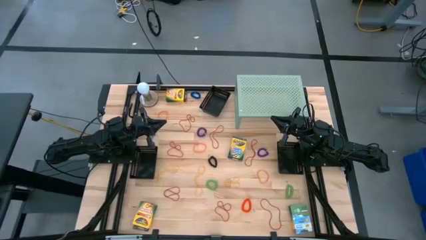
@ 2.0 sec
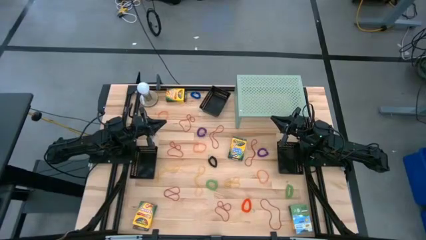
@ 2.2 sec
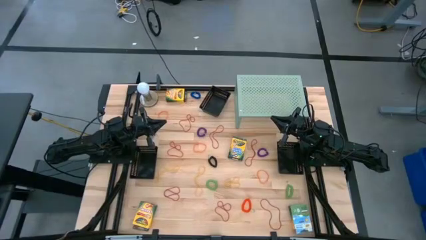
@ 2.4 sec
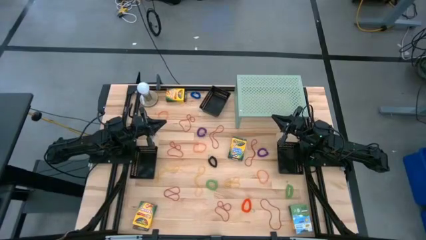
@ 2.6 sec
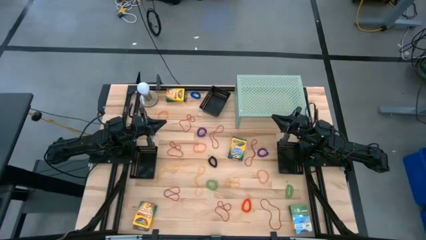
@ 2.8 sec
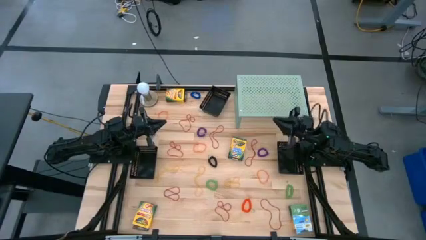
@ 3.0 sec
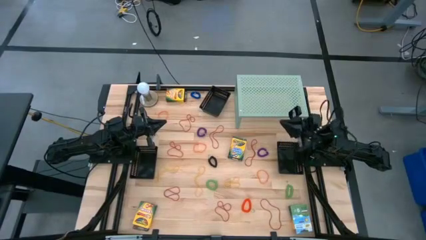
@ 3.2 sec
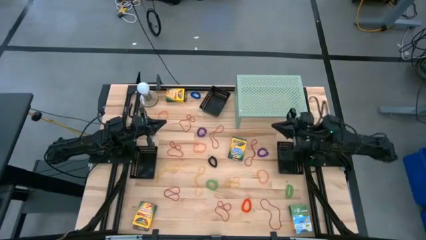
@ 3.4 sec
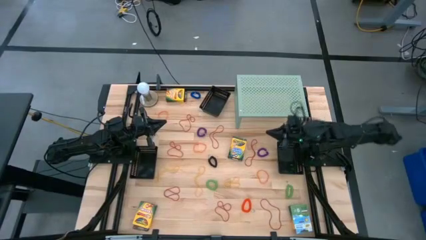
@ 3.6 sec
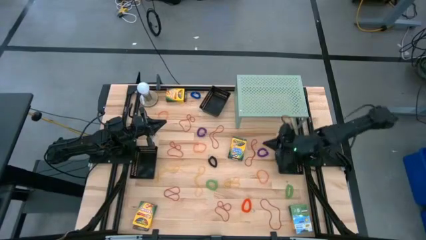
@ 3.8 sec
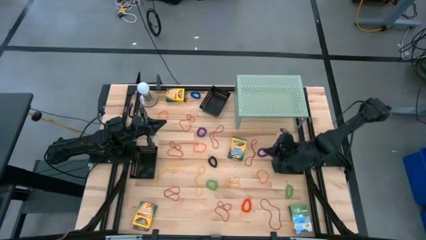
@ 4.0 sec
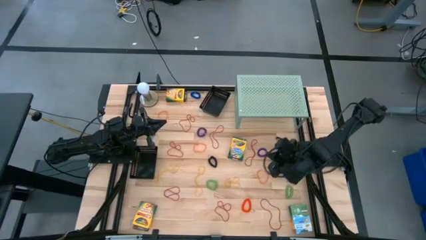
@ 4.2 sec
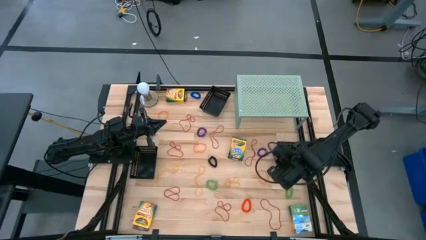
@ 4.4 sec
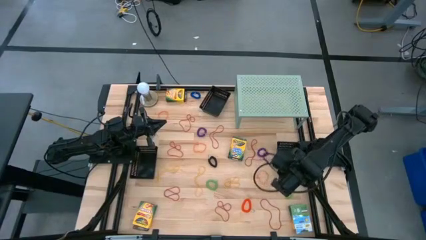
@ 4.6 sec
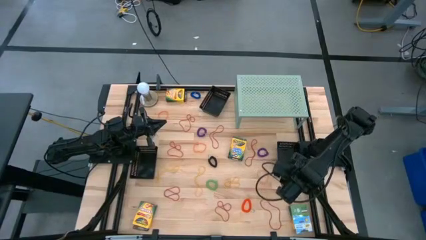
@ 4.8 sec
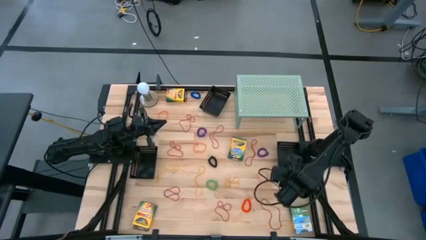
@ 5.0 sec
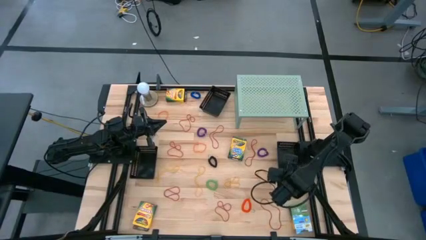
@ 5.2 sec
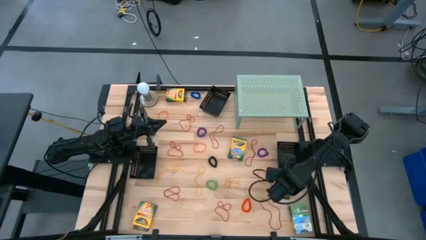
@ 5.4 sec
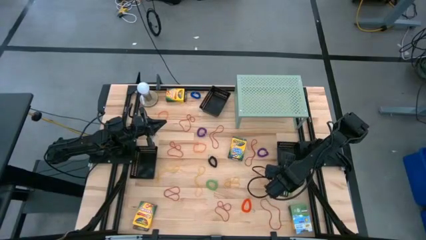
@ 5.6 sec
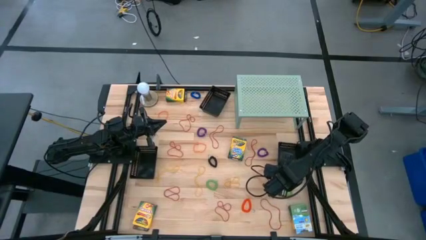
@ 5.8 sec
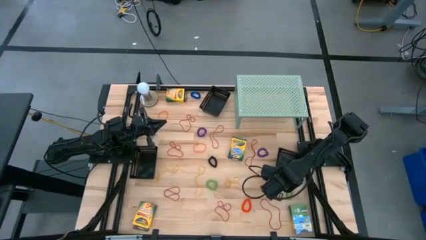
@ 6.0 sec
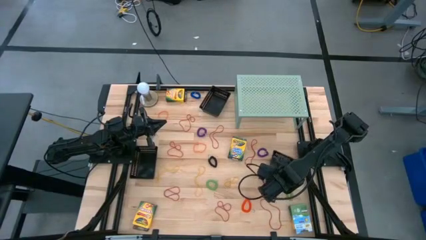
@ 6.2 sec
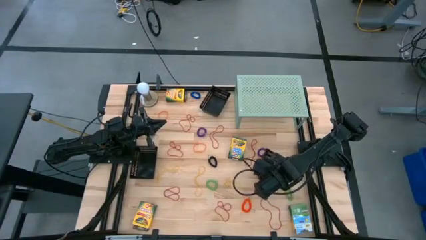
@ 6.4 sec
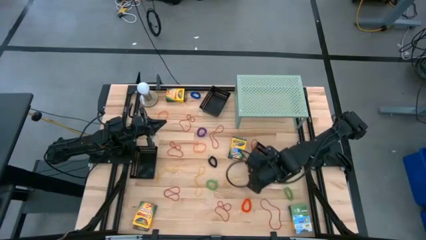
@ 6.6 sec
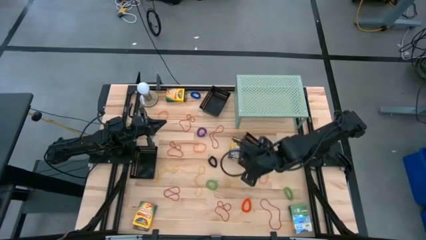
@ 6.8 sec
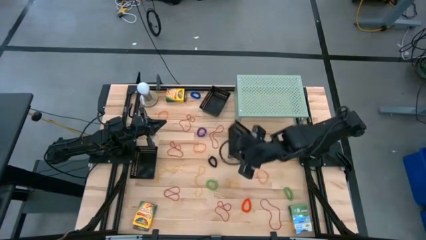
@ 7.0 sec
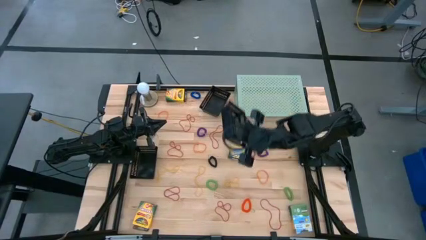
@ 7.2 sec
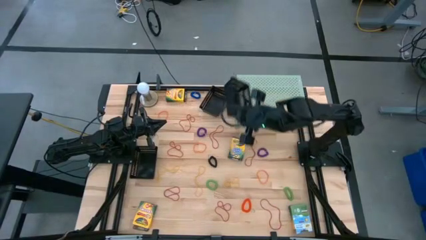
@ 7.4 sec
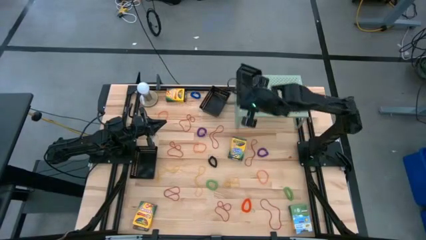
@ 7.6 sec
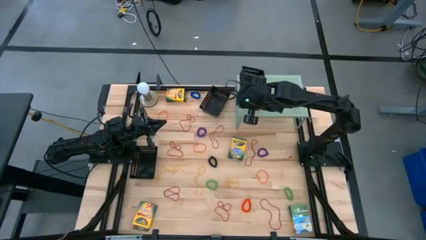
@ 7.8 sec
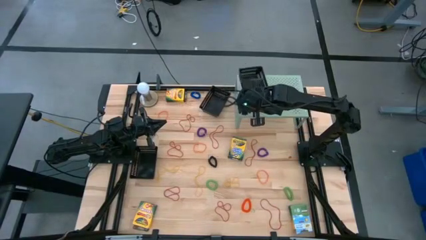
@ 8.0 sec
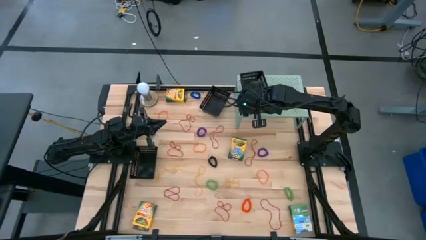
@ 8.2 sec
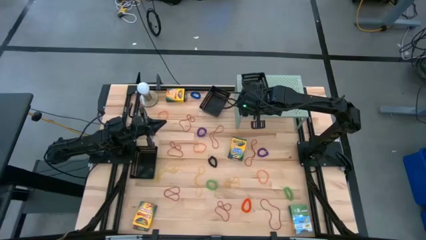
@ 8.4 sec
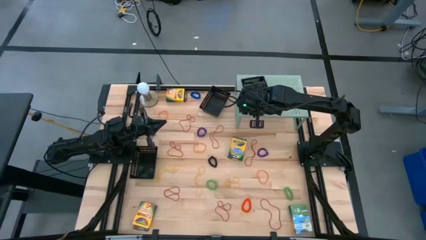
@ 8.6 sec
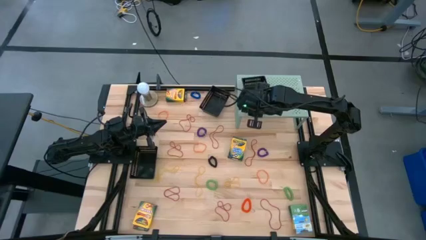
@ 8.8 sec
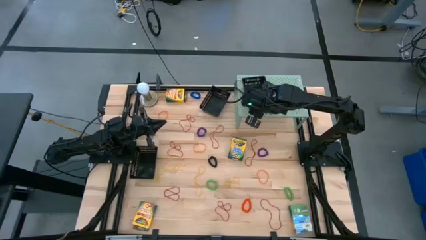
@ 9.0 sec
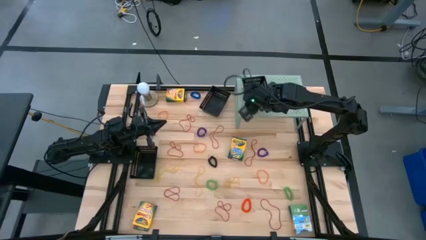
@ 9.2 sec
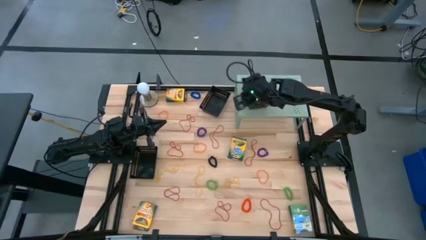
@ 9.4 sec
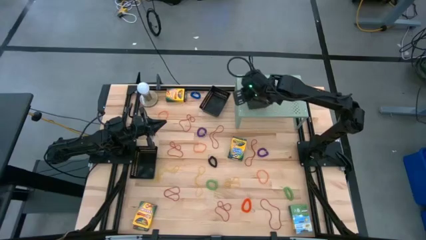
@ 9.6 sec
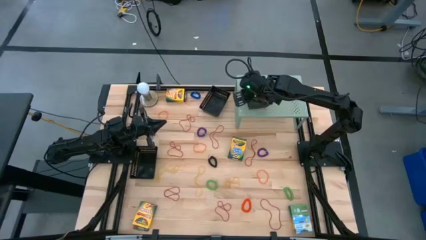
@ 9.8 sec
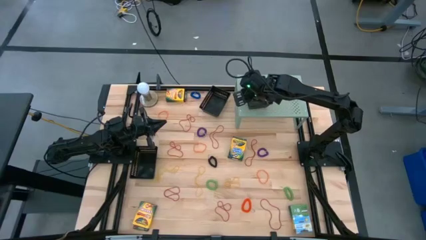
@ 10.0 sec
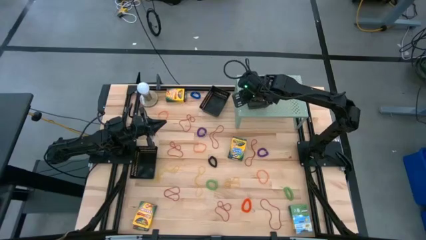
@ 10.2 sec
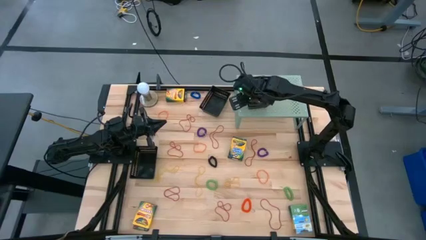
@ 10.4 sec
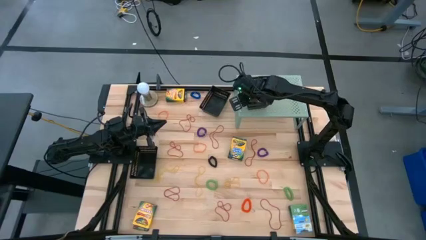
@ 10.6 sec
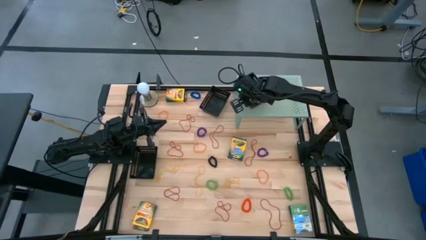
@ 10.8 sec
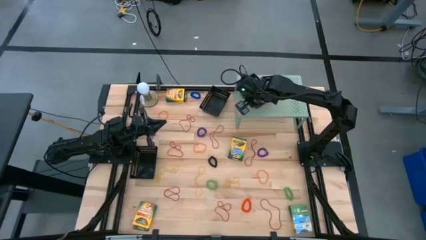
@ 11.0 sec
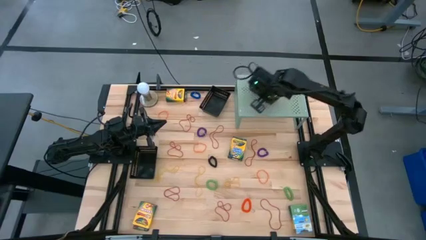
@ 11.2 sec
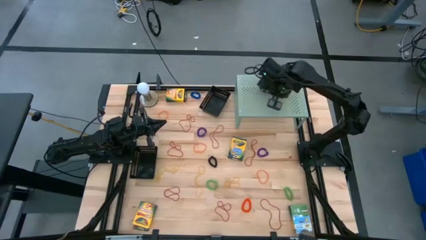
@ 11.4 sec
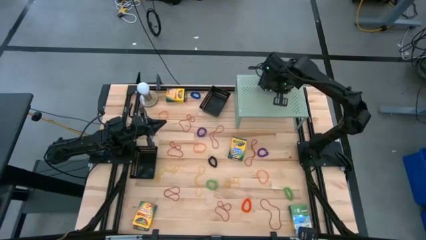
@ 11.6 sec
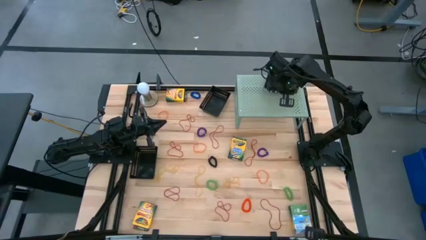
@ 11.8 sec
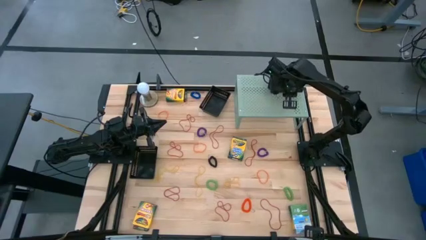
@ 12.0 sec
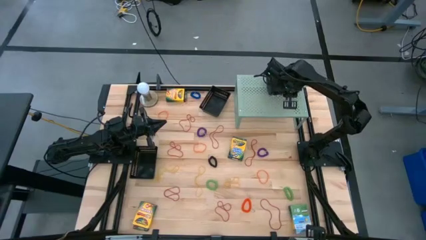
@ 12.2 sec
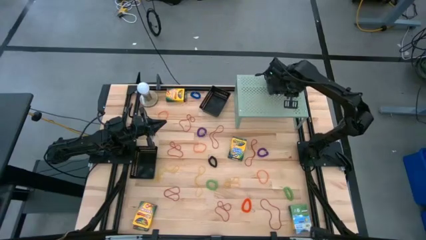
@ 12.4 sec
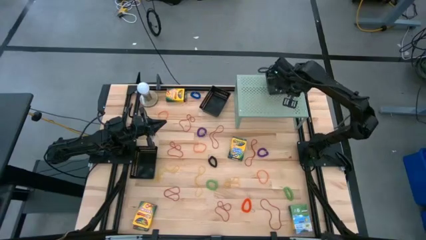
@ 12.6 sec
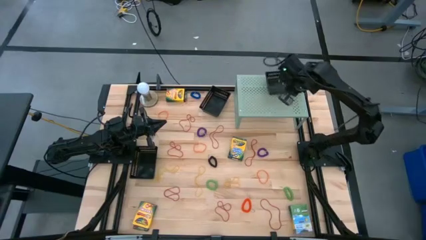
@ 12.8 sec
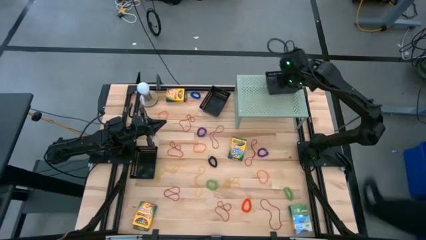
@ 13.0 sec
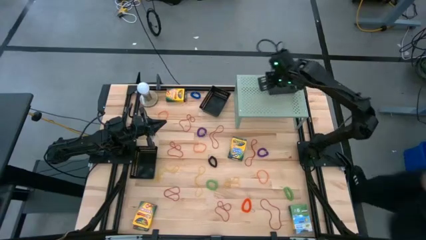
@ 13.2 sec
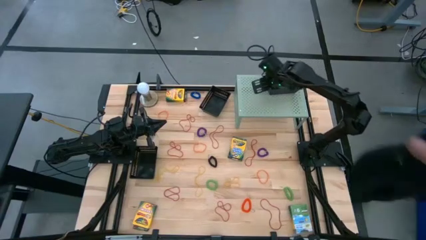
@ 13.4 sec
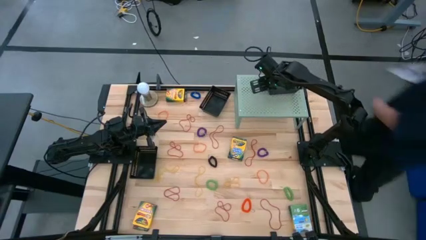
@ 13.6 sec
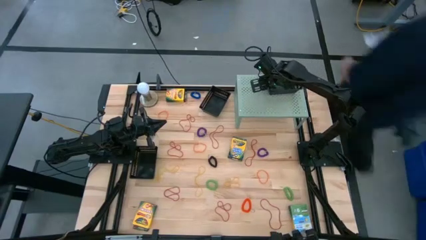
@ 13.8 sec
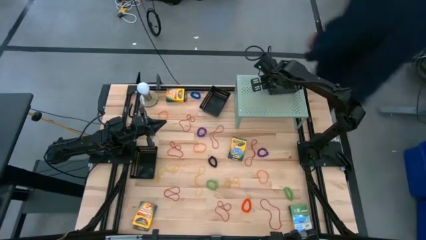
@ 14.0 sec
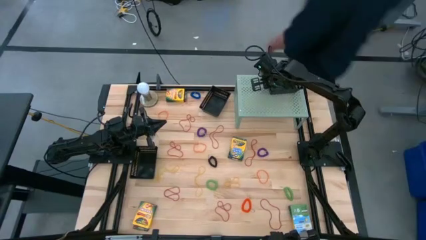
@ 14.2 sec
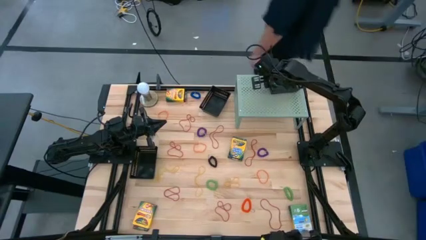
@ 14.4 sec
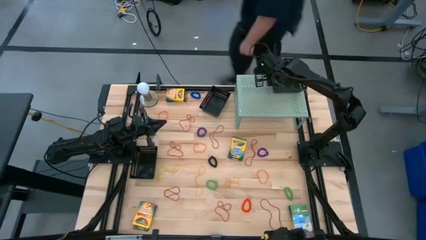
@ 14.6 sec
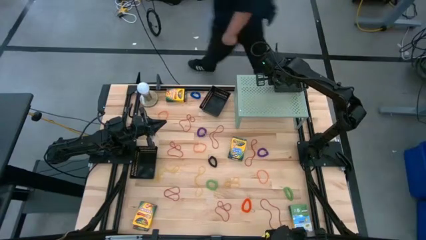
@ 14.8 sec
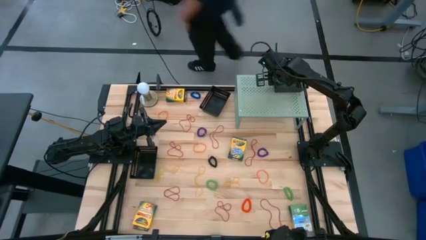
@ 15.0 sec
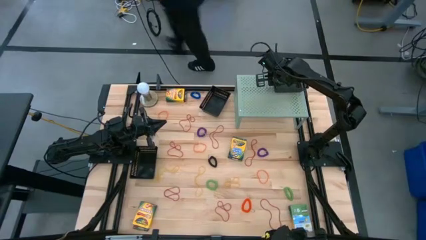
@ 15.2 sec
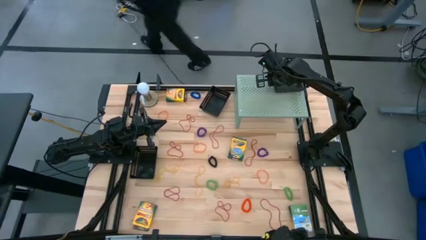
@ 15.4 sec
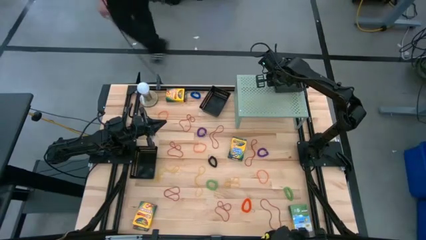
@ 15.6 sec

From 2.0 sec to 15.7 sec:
Task: Pick & Place Office Desk Supplies
Put the right black bin on the shelf

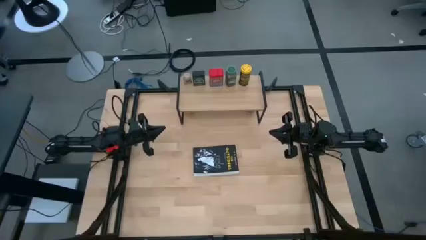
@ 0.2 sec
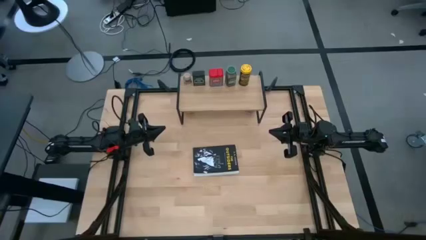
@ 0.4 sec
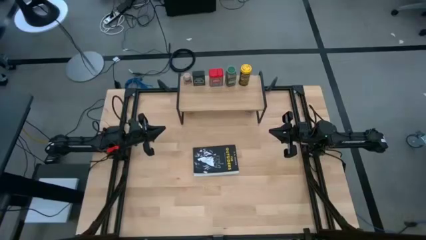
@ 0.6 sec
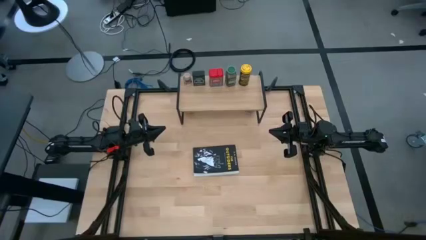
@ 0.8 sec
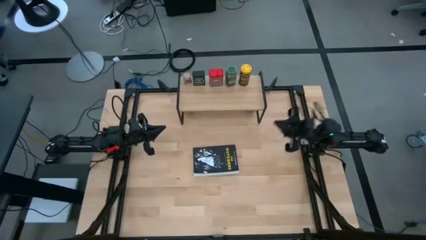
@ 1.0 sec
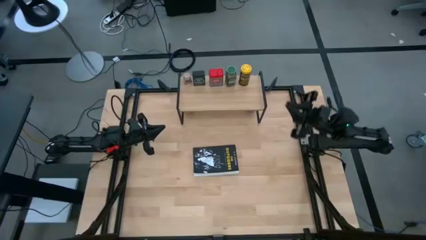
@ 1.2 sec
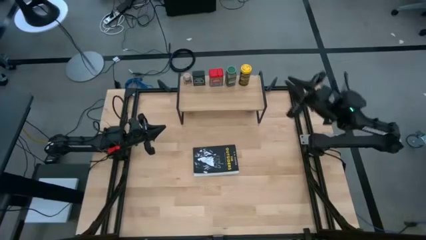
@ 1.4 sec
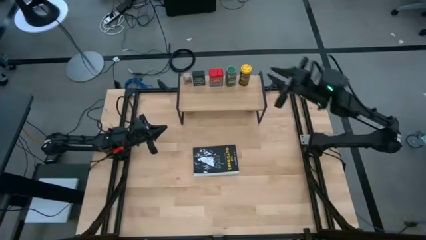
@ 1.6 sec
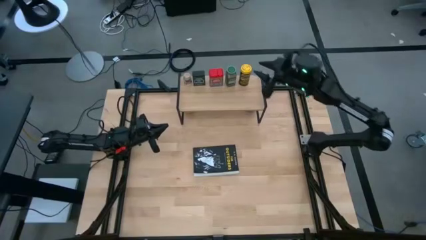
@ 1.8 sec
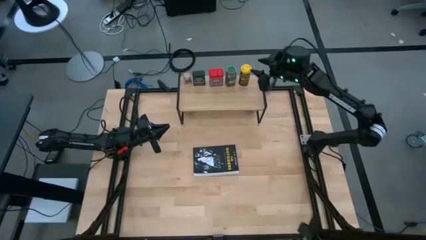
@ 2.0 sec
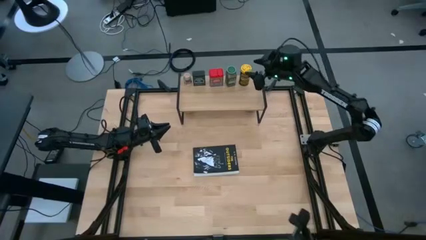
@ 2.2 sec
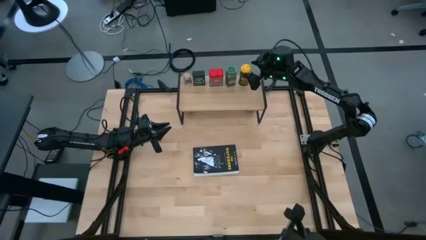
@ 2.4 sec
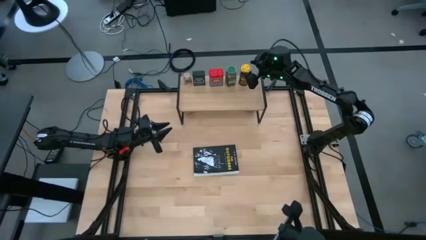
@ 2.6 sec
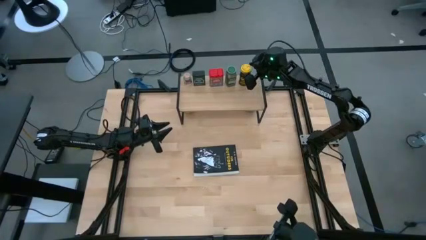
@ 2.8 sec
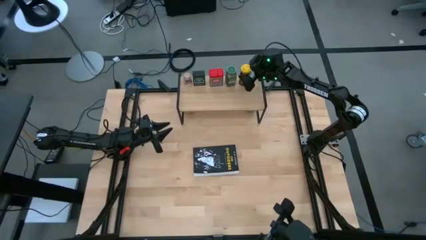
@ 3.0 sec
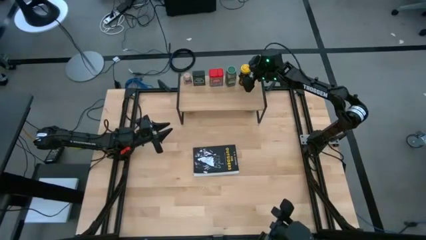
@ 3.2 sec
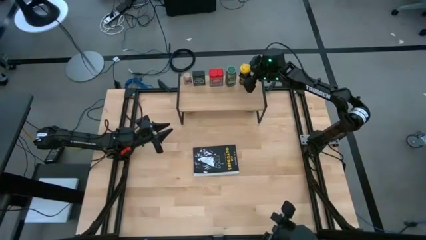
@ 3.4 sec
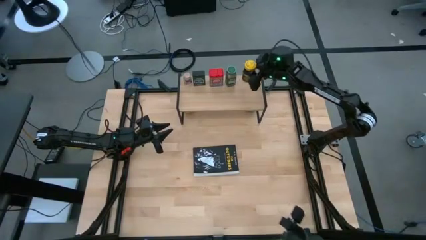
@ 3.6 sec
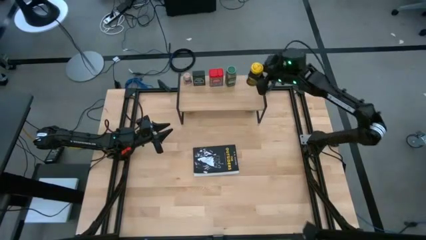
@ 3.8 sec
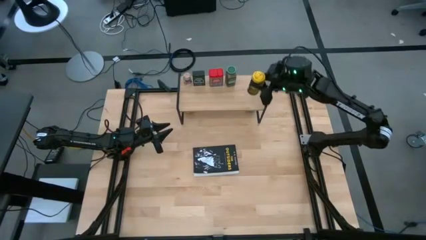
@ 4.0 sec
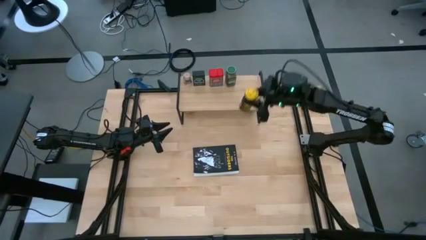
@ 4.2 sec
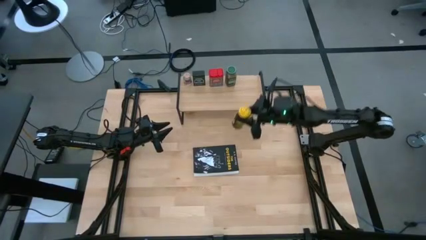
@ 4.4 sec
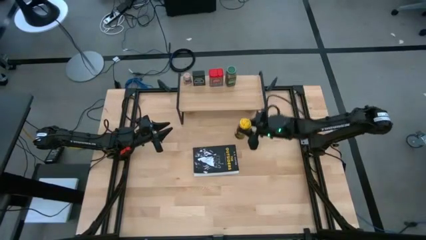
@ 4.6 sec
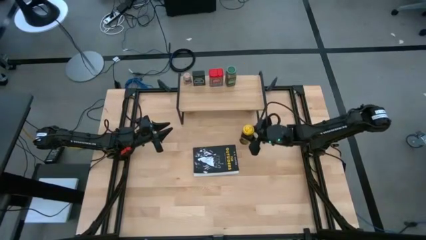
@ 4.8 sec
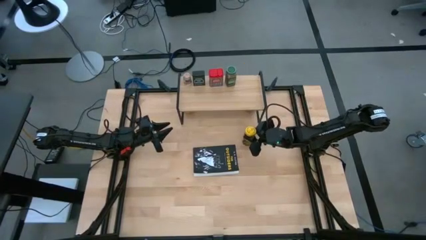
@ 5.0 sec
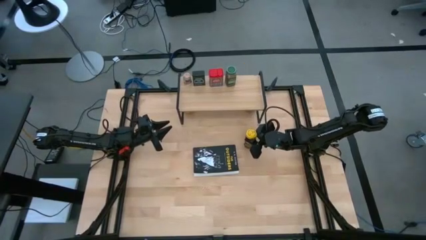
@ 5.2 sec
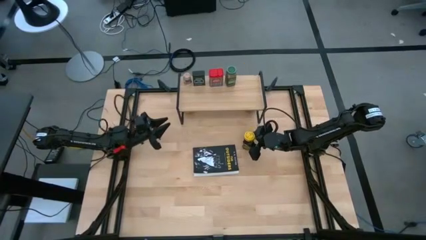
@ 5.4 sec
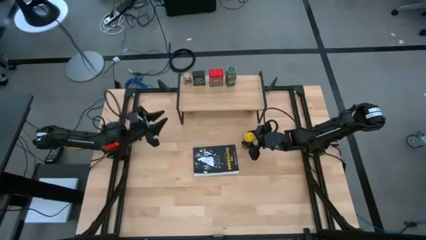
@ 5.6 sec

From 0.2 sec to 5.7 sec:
Task: Shelf spices
Remove the yellow seasoning bottle from the shelf
